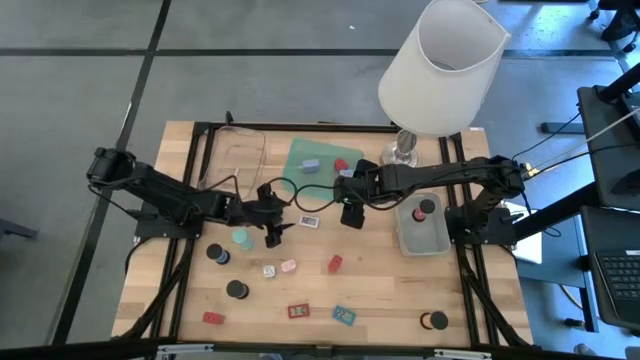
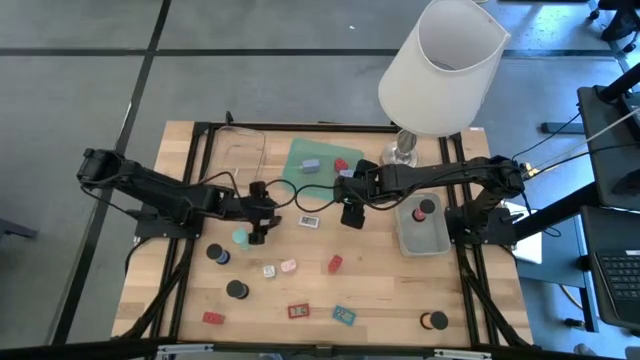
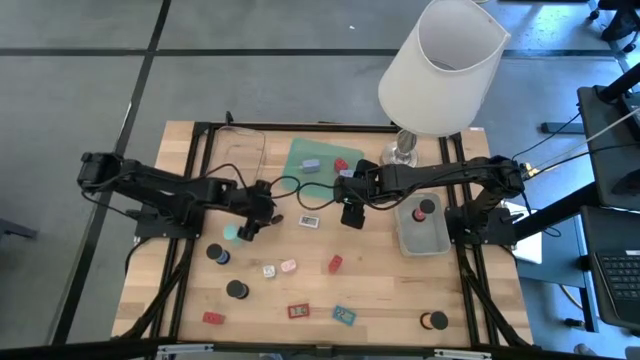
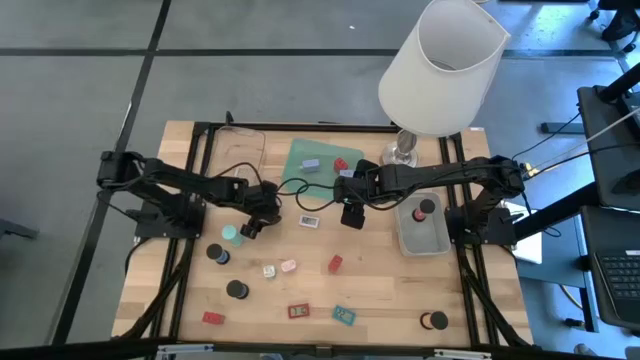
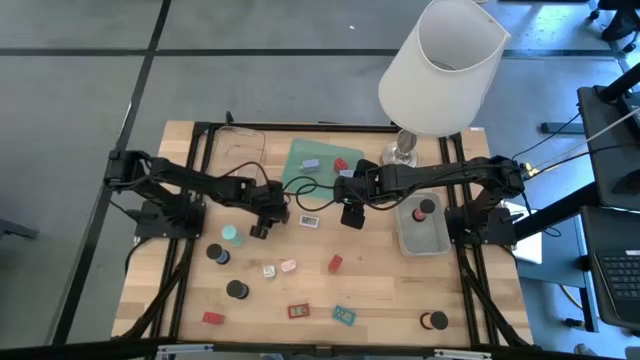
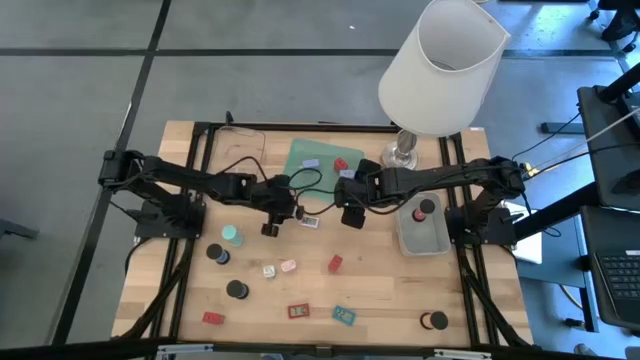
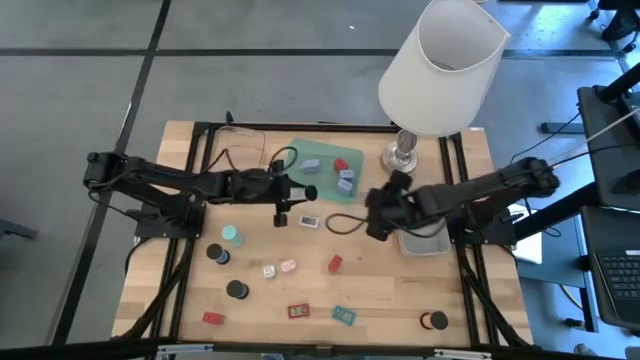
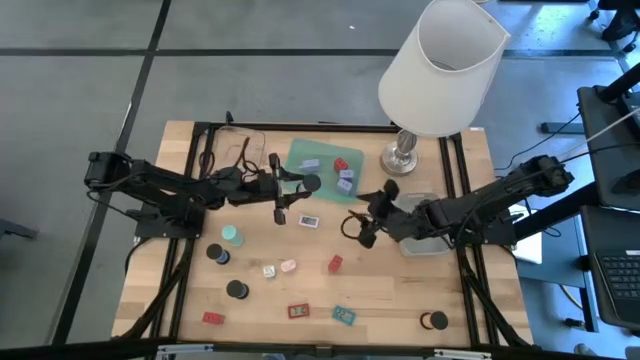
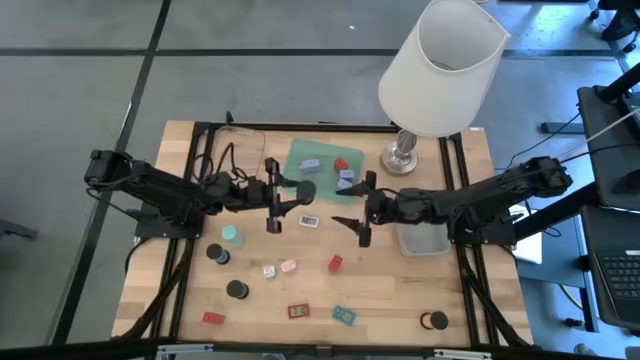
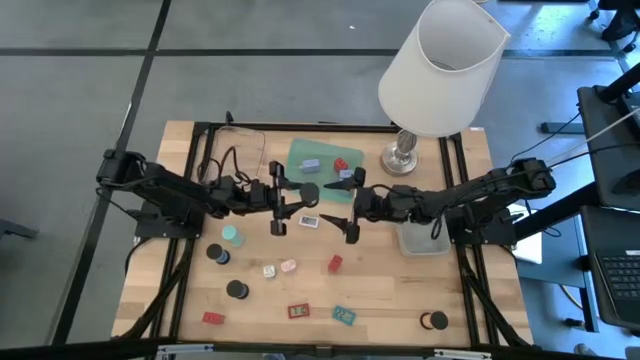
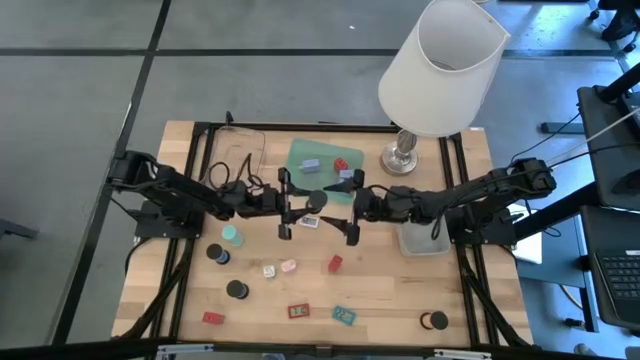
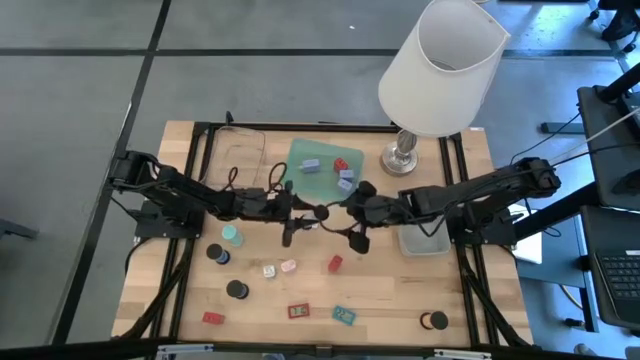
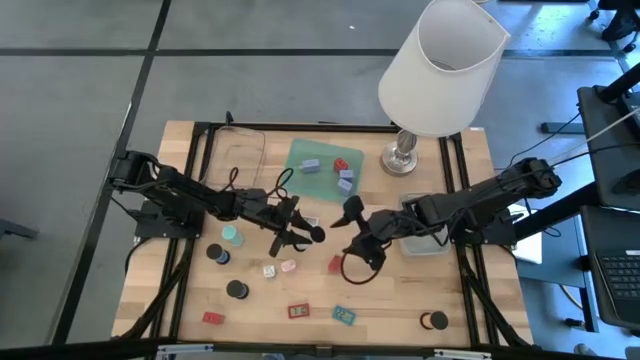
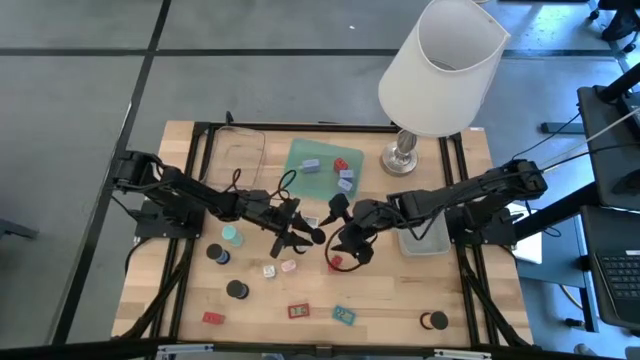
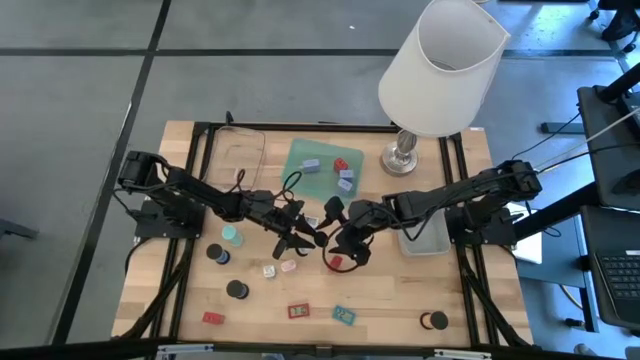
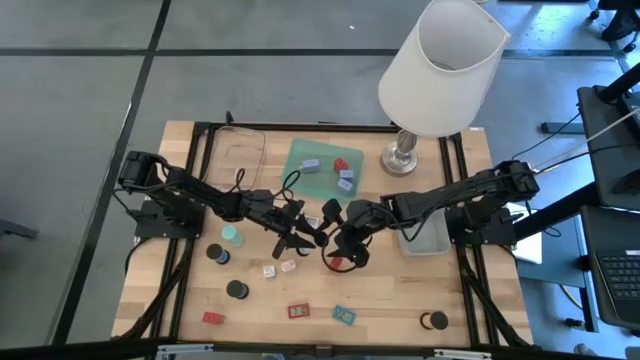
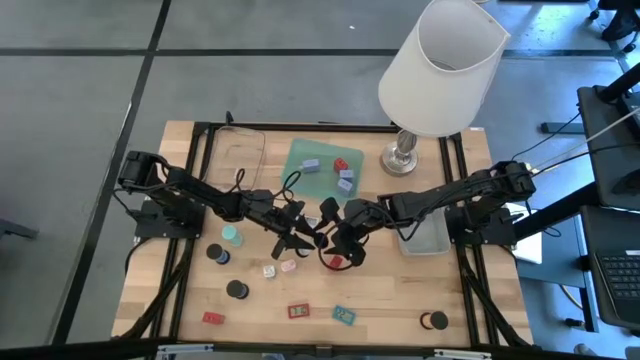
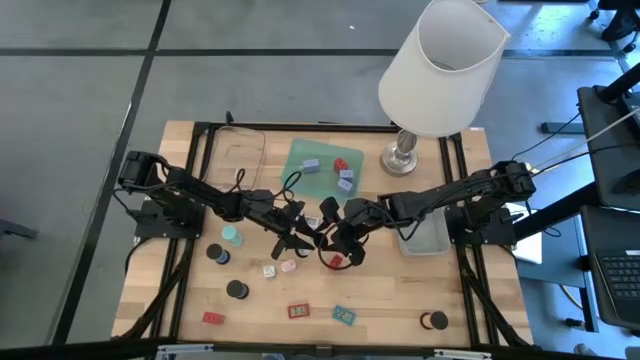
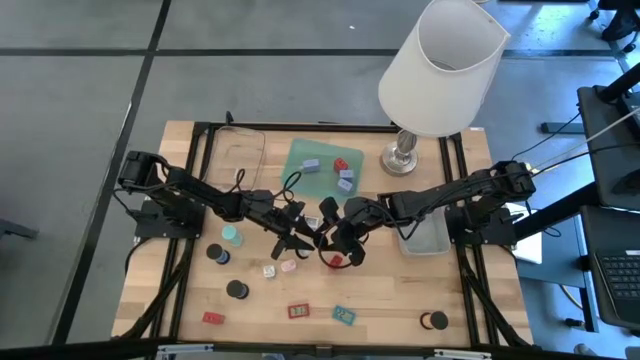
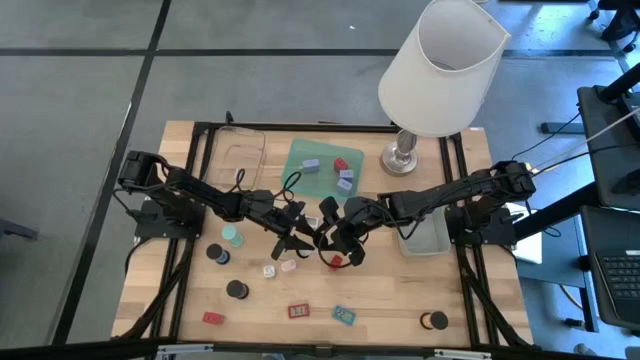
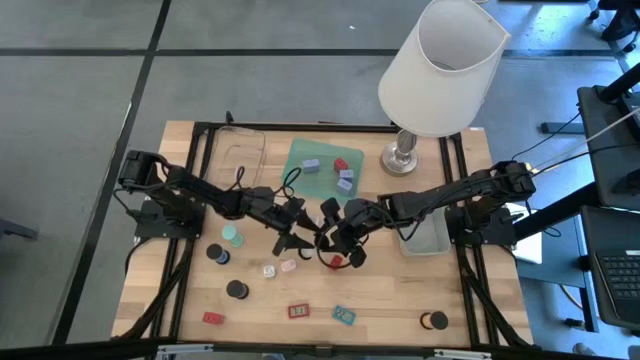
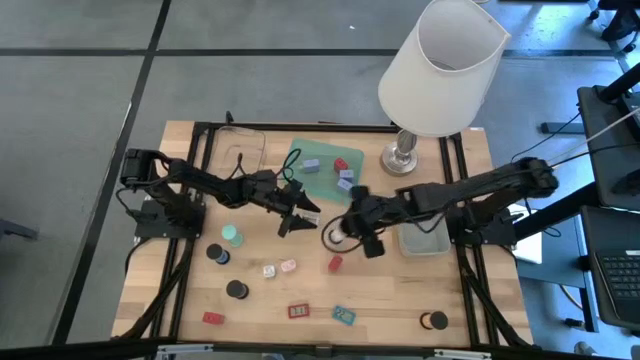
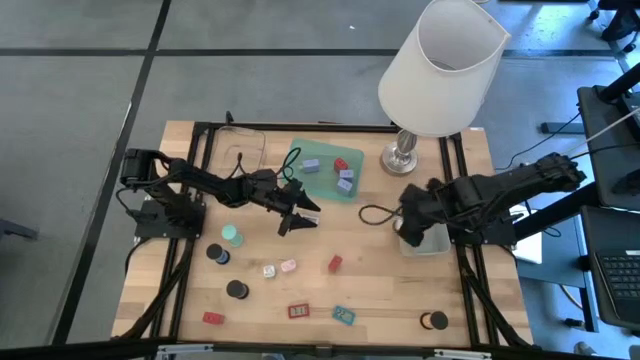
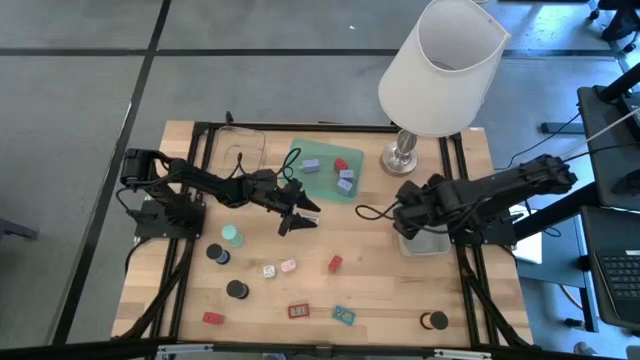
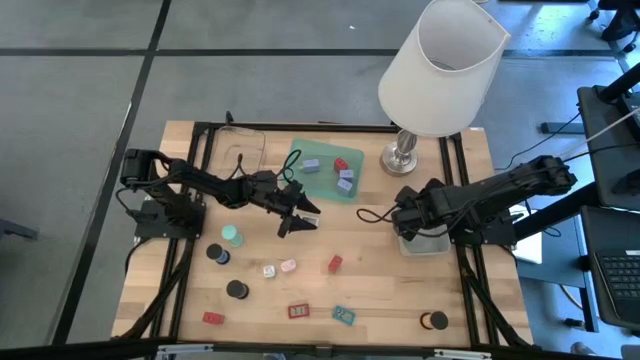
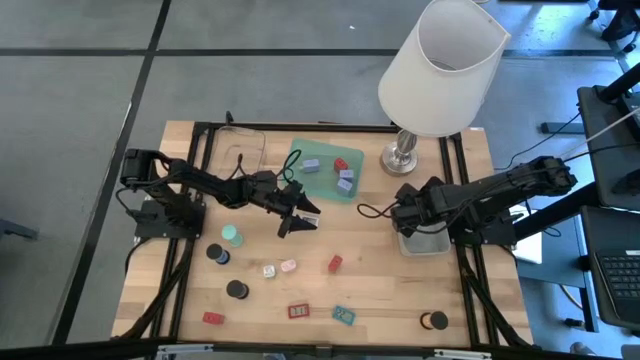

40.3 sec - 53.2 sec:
Task: Pick & Place Office items
Put the white hourglass into the gray bin

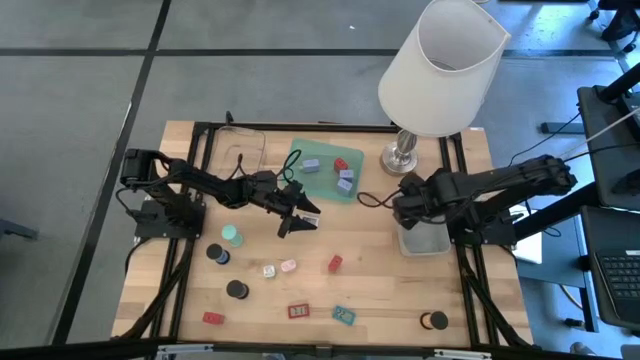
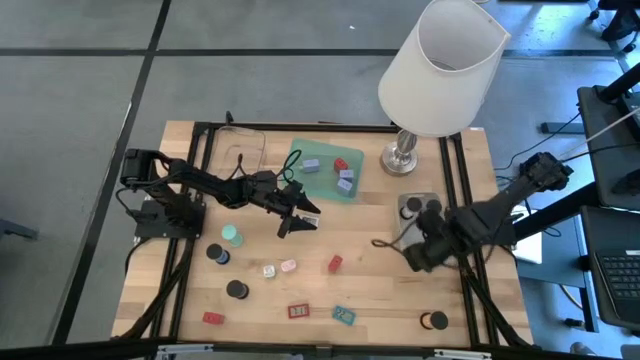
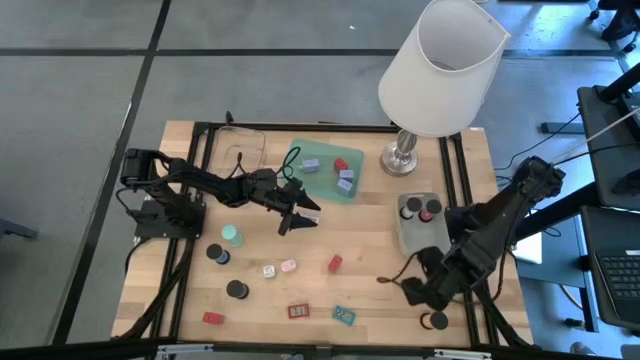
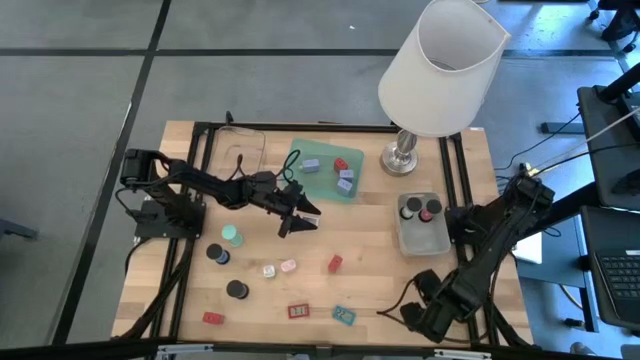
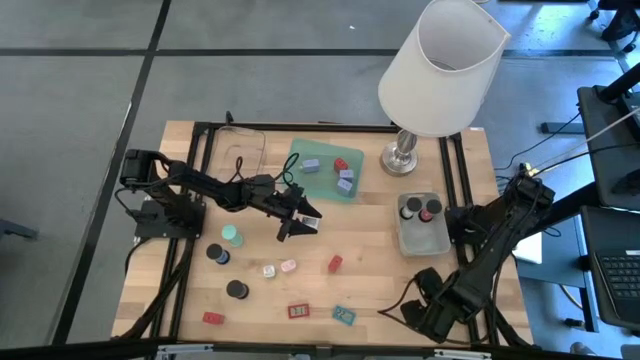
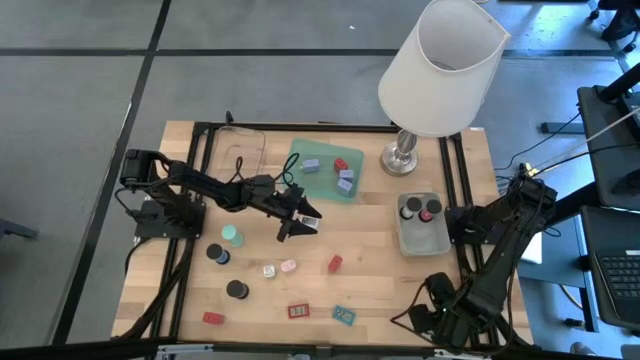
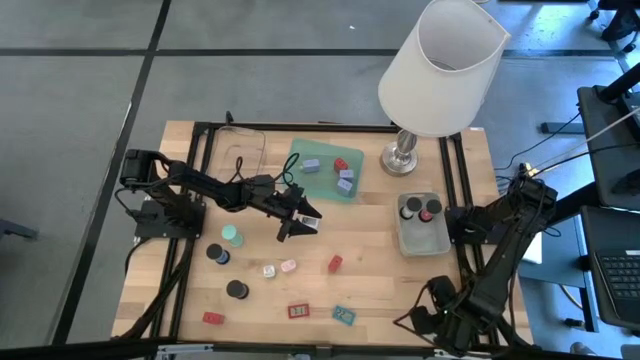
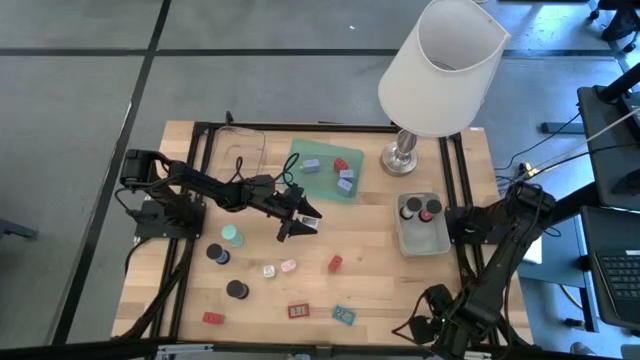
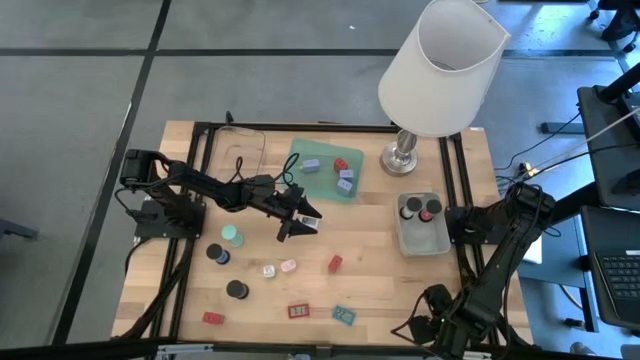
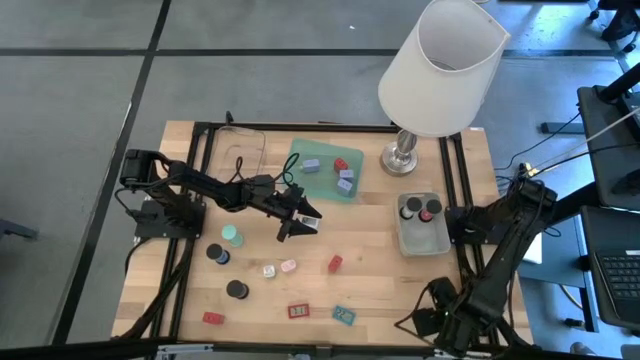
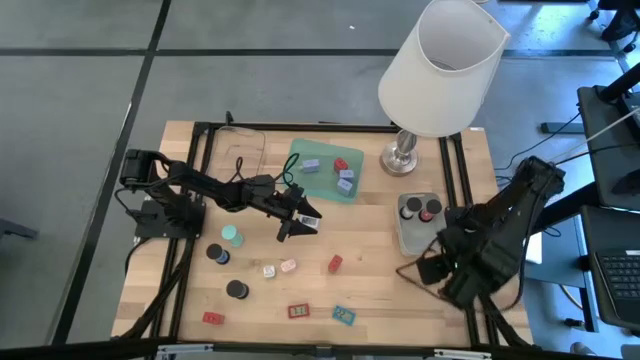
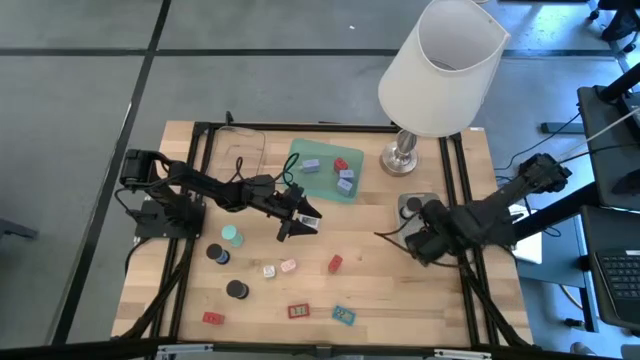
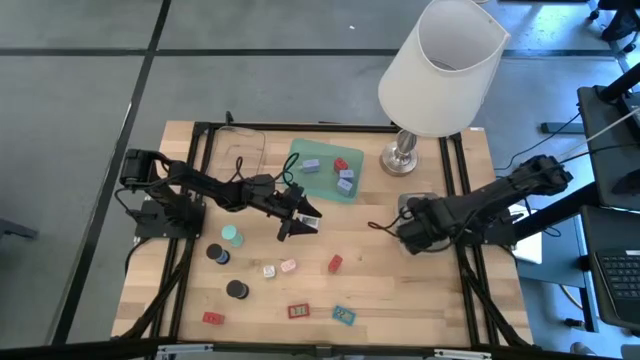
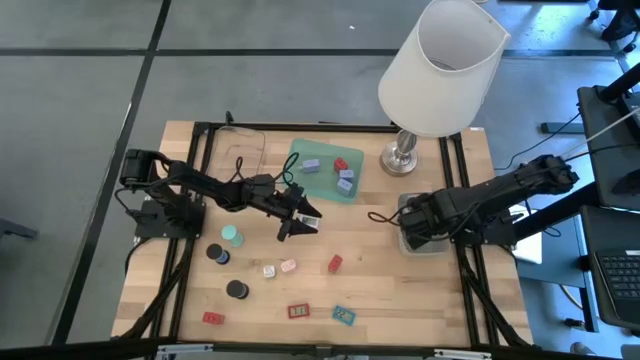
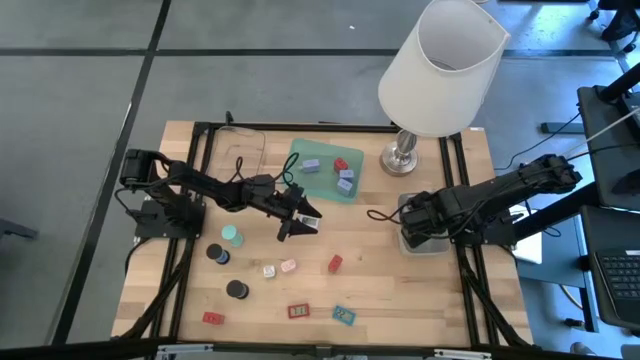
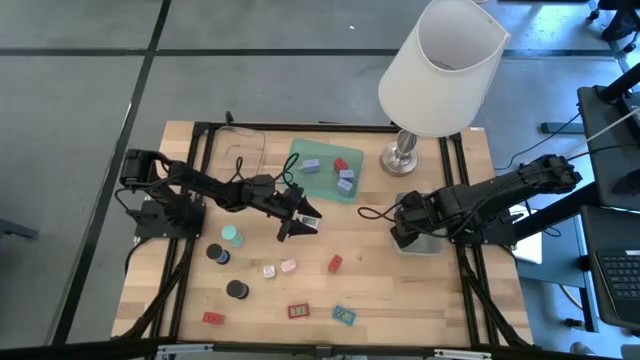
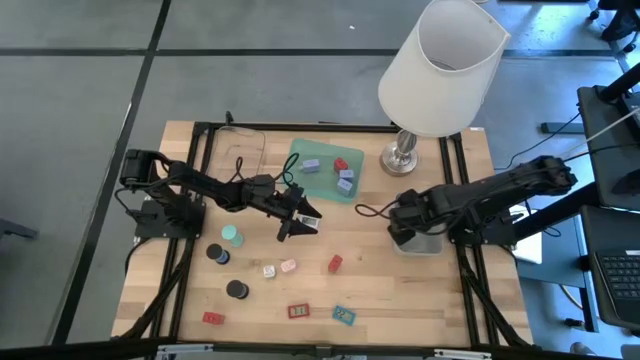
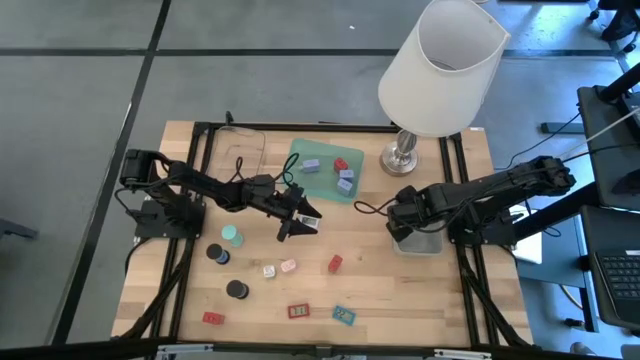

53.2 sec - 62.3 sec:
Put the yellow hourglass into the gray bin
